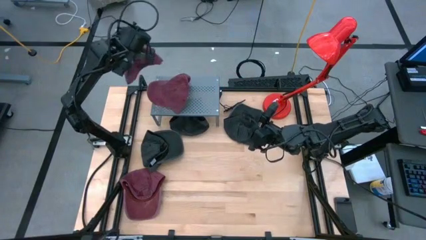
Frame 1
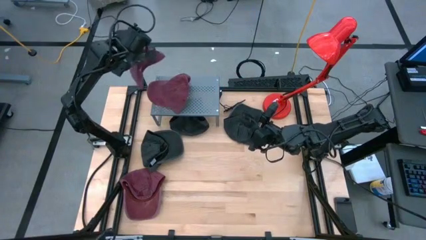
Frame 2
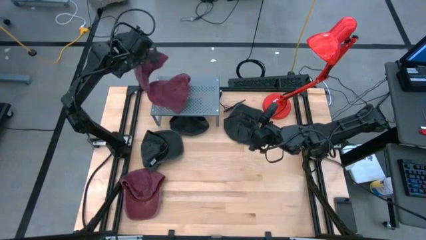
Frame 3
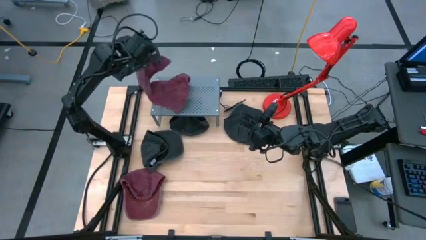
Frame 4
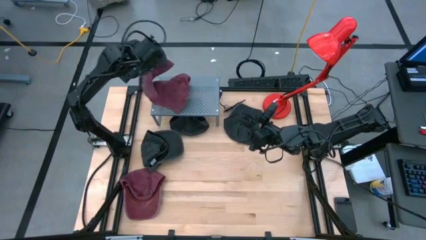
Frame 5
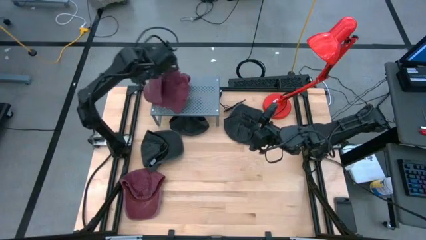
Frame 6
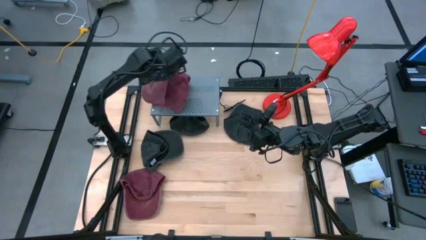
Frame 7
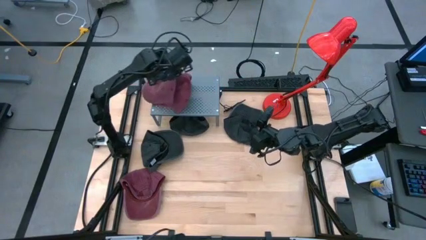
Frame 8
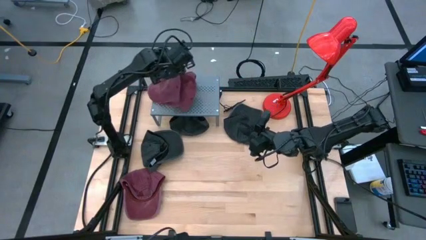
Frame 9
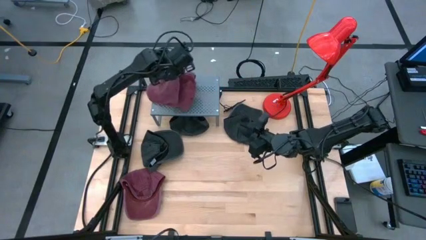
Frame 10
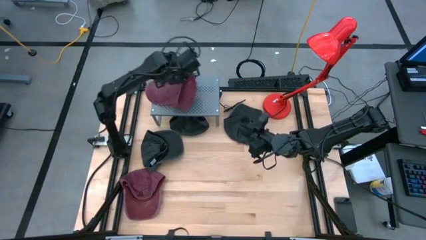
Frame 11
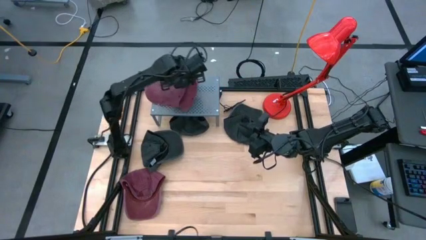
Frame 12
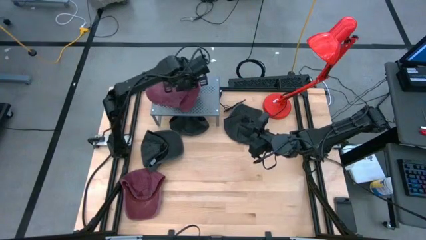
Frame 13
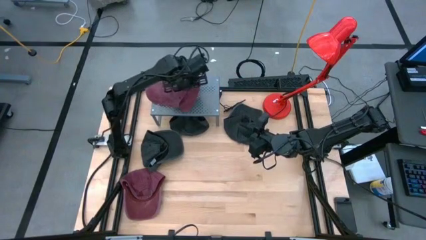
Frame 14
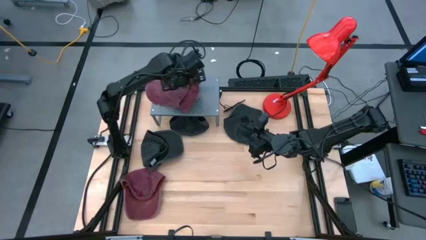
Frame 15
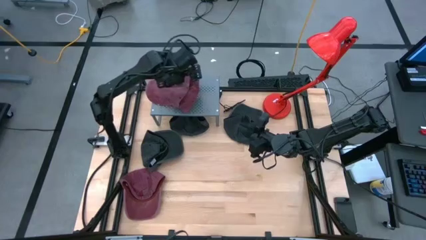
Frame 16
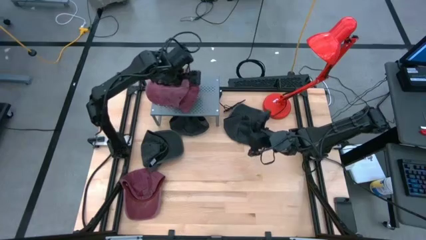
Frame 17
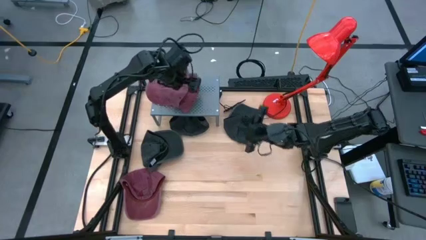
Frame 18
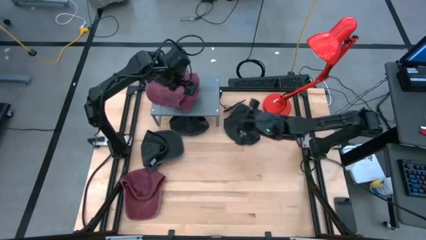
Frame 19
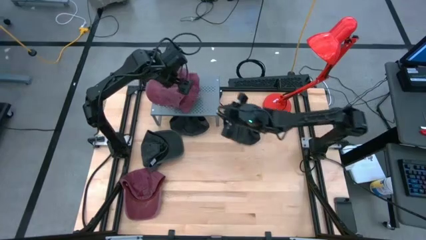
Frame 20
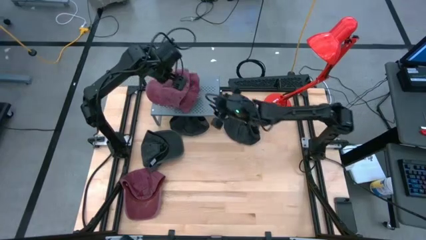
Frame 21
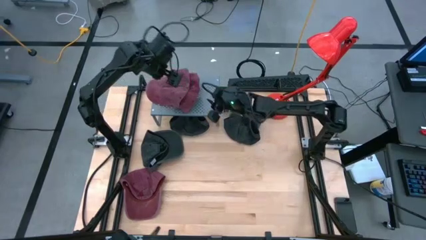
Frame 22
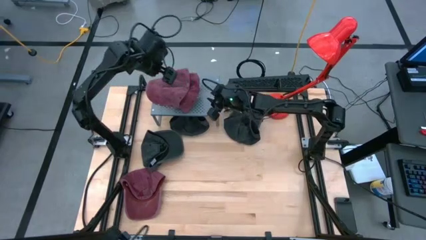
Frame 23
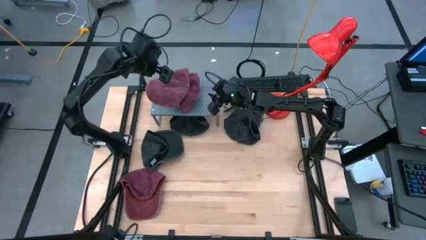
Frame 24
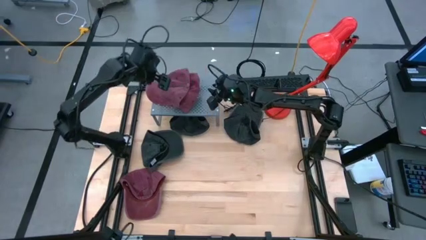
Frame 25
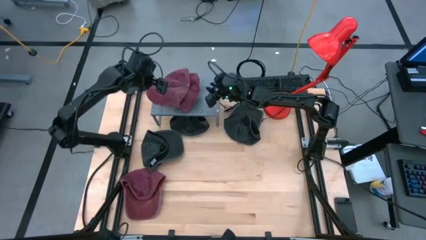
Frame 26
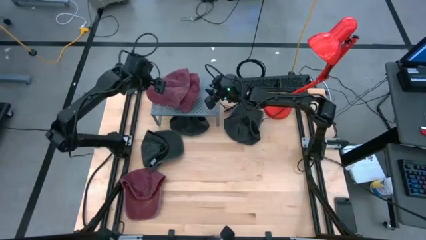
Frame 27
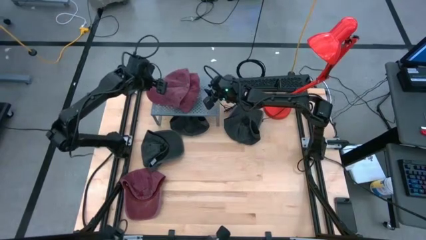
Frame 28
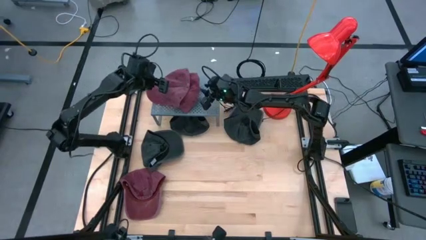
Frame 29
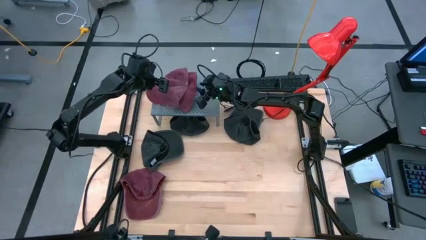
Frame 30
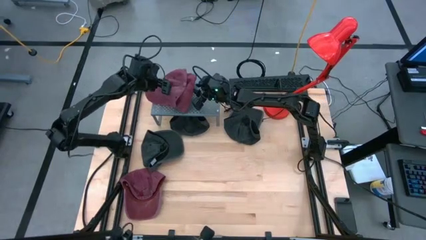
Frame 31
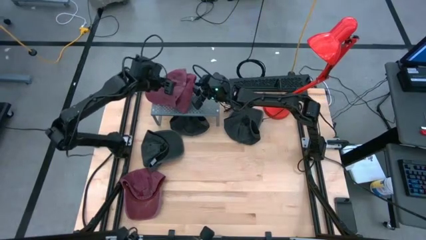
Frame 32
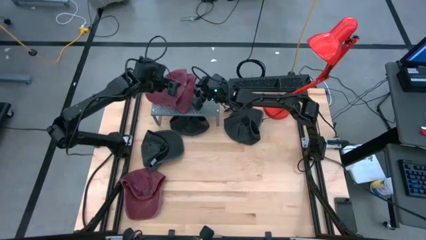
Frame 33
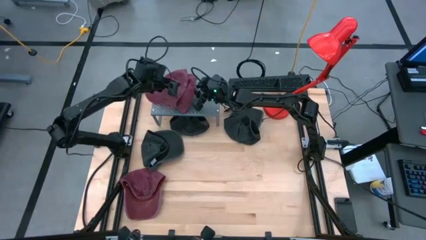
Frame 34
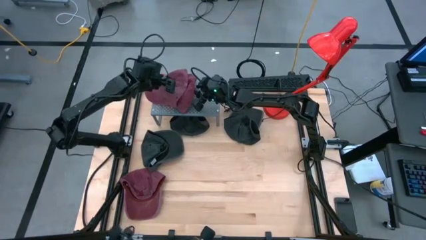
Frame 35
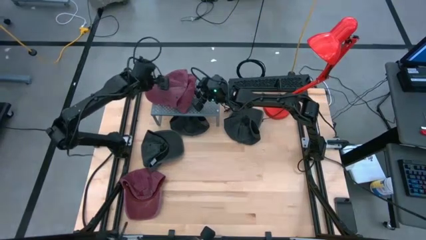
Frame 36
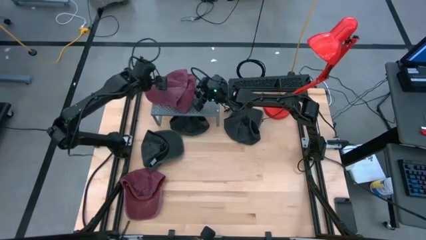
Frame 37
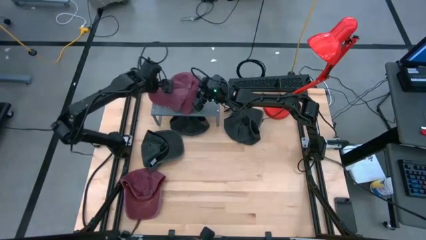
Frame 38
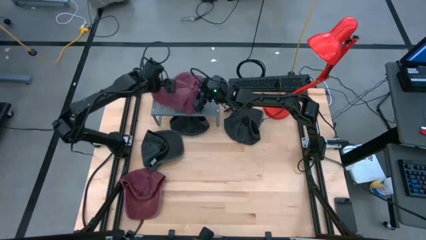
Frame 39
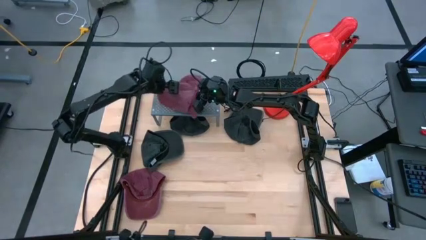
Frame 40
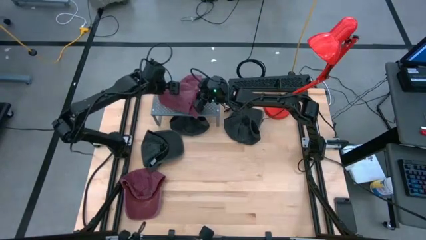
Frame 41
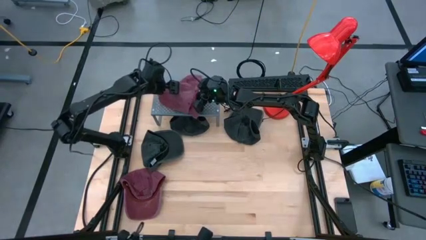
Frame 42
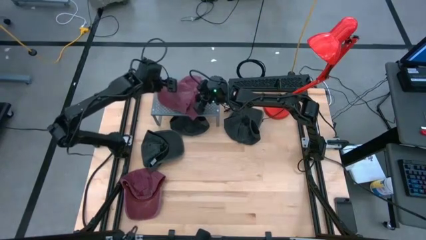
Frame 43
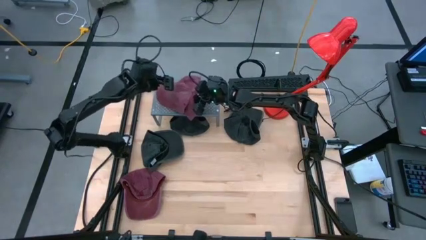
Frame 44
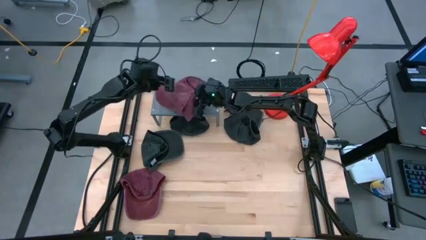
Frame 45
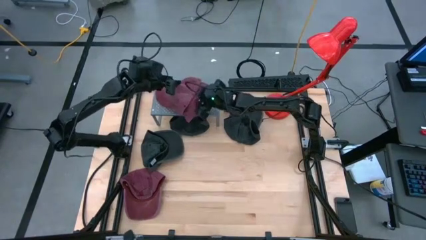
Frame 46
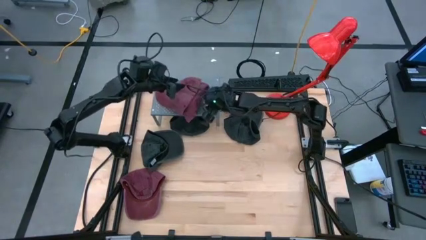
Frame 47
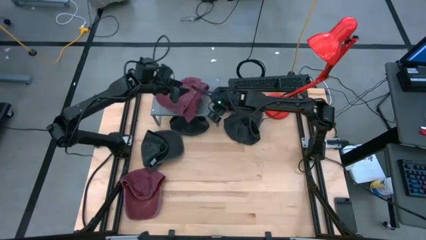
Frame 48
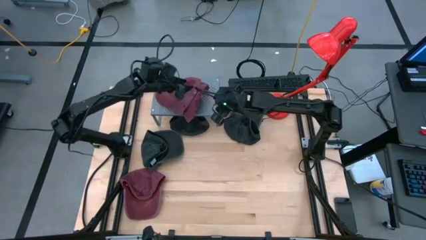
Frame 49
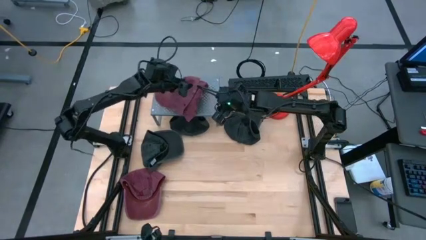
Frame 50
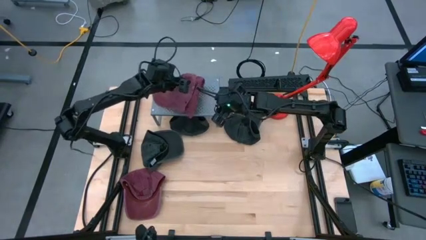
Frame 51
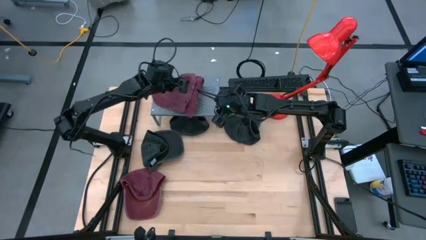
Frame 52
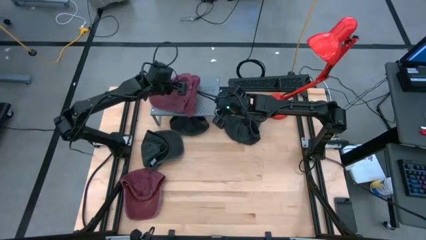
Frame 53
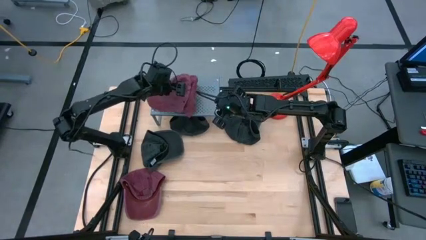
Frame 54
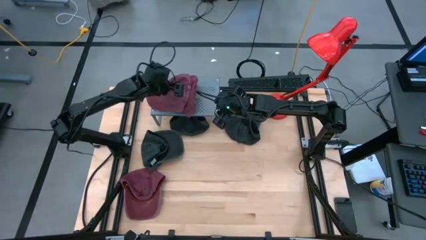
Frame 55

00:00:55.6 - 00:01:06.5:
Task: Pick & Place hat
Stack the top red cap on top of the red cap on the shelf

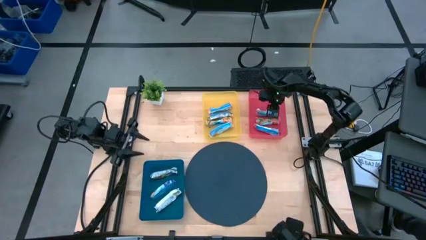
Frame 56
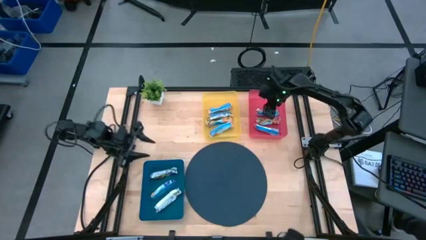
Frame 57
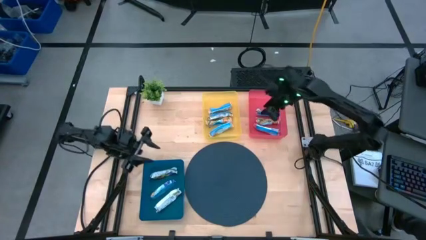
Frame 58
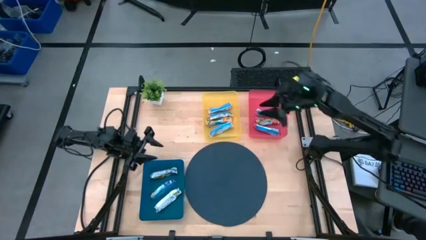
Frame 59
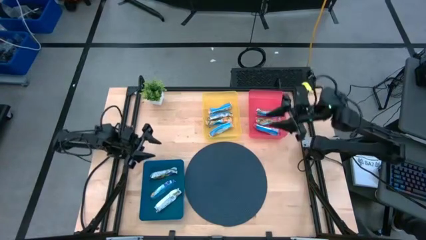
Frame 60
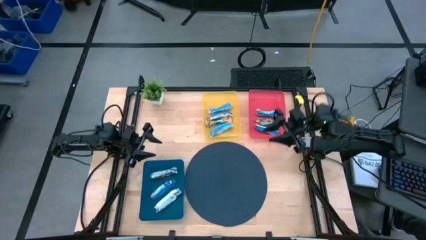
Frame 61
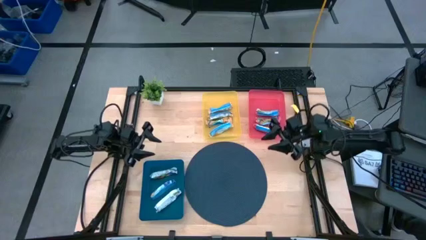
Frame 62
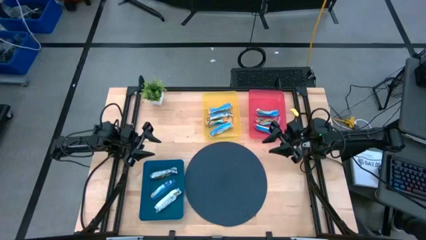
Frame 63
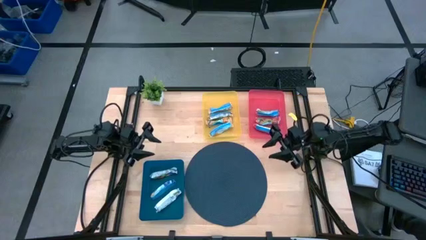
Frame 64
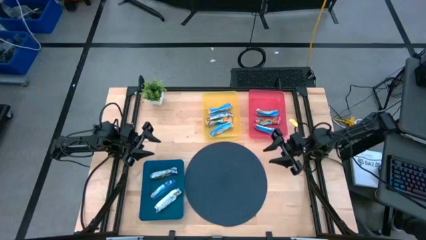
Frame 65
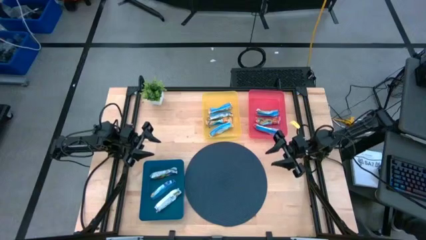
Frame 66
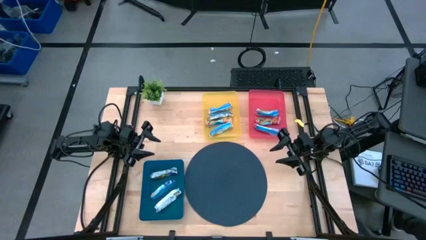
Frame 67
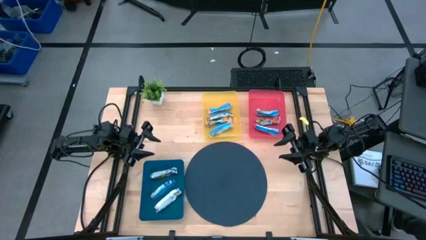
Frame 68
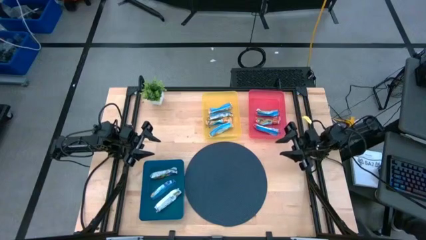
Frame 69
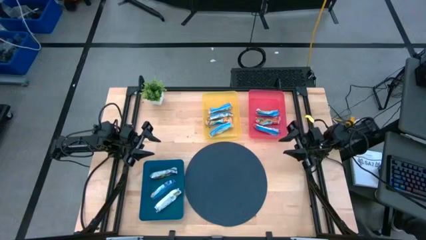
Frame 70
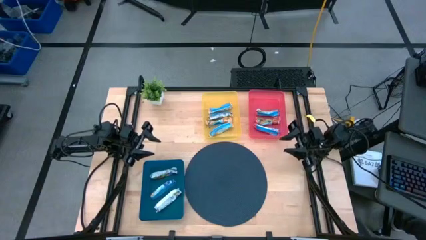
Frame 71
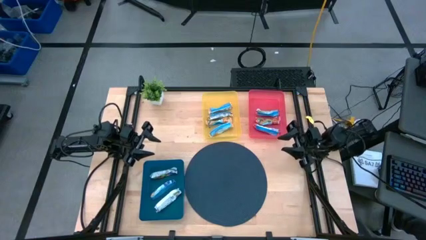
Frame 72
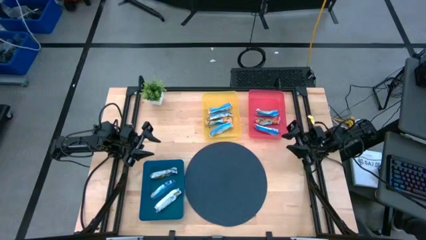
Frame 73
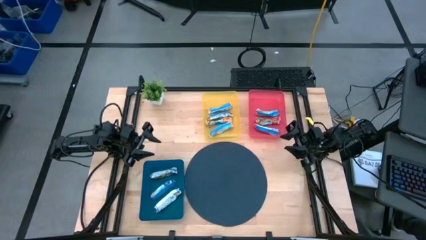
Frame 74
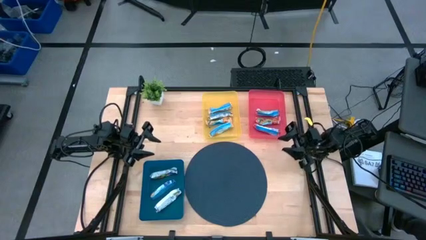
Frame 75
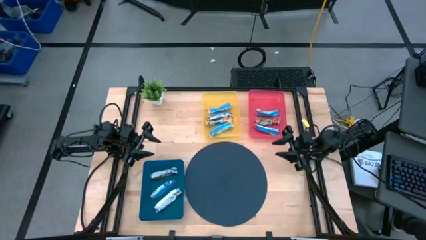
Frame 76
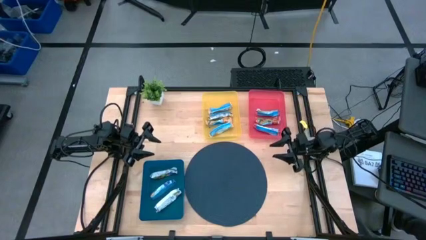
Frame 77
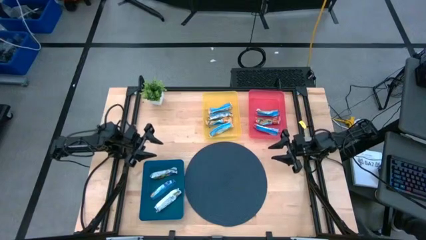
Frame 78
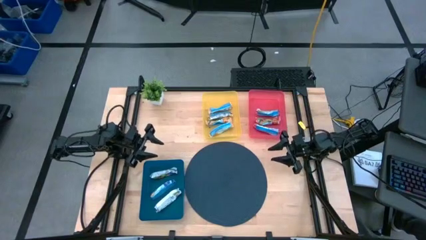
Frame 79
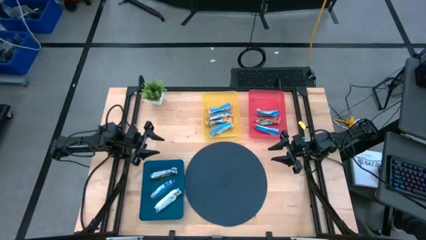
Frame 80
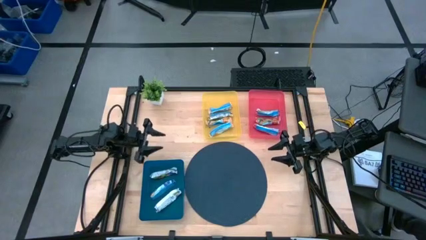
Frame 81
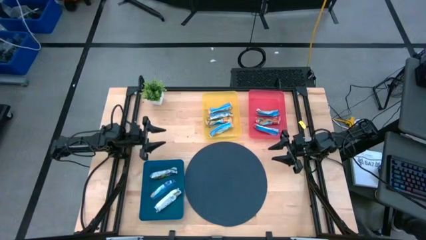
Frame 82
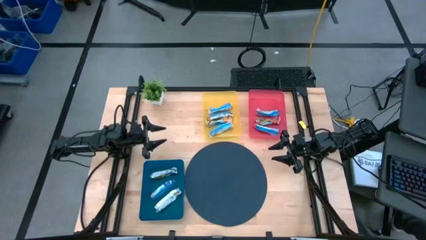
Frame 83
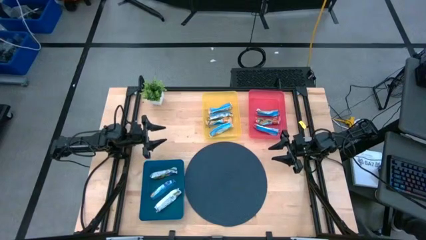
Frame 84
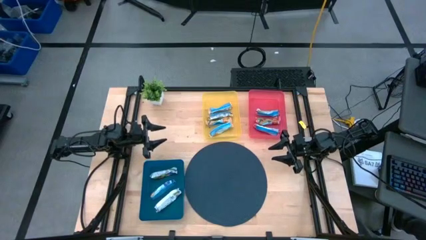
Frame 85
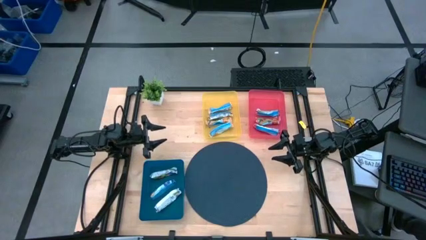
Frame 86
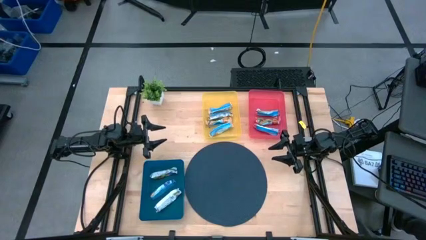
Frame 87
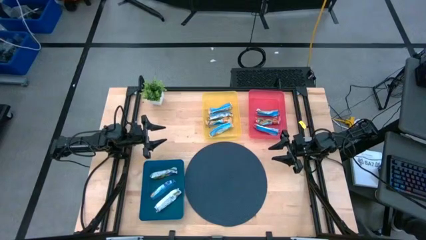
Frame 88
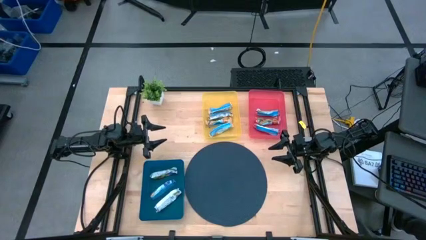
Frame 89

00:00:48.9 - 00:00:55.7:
Task: Pick and place Granola Bars by type
Return to Home Position
